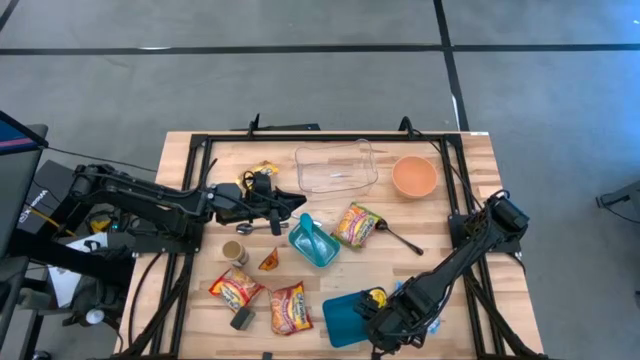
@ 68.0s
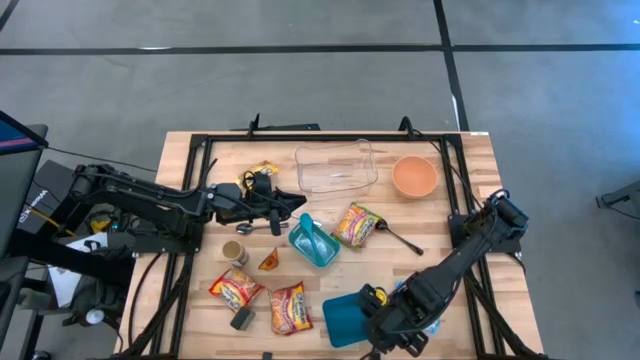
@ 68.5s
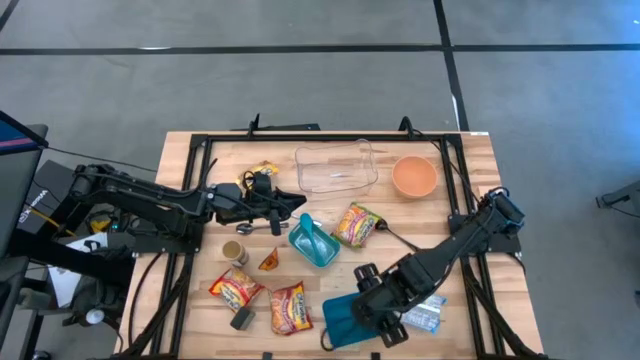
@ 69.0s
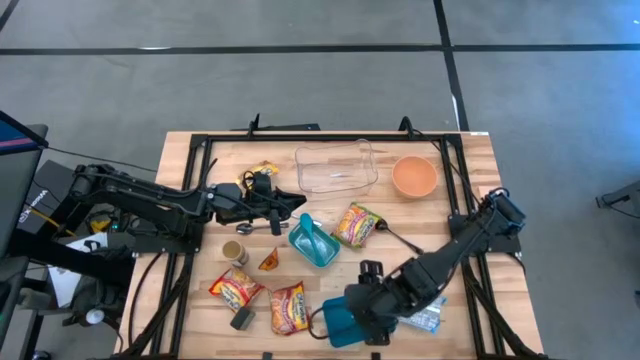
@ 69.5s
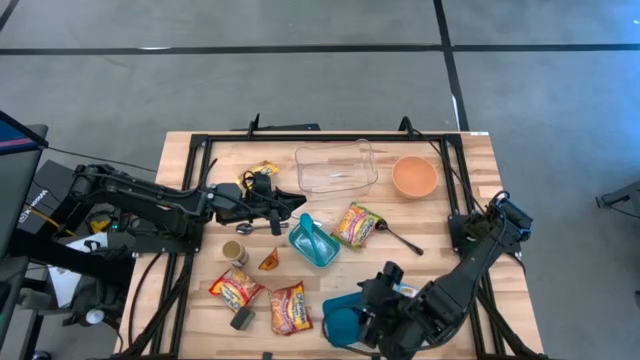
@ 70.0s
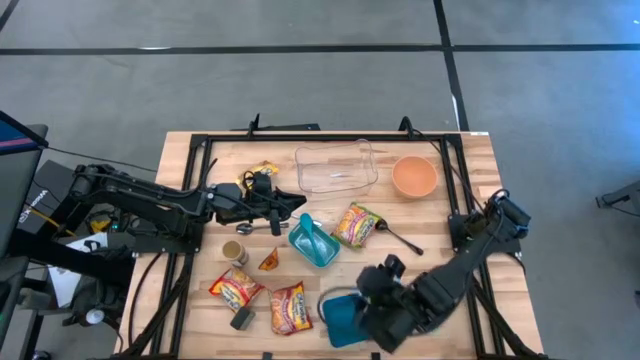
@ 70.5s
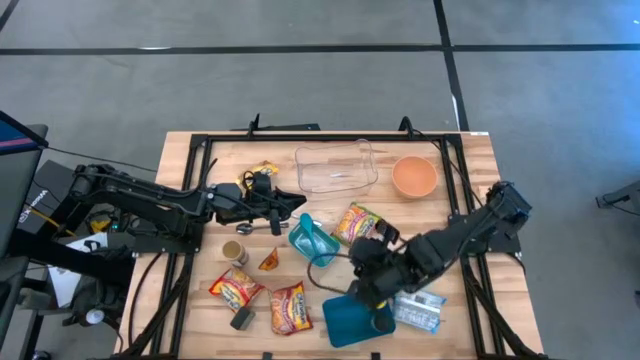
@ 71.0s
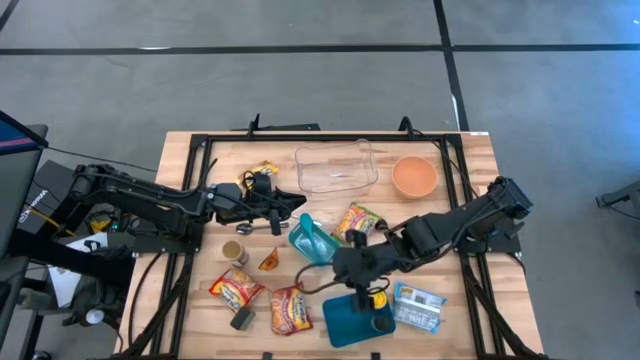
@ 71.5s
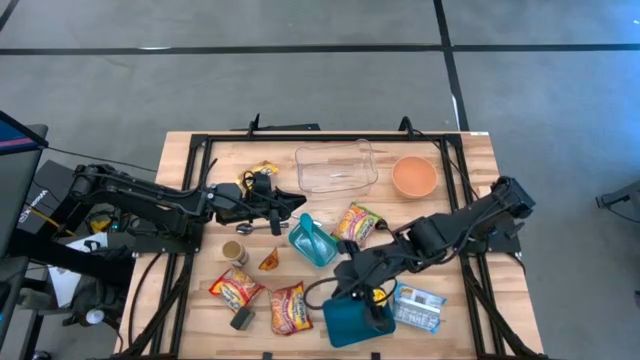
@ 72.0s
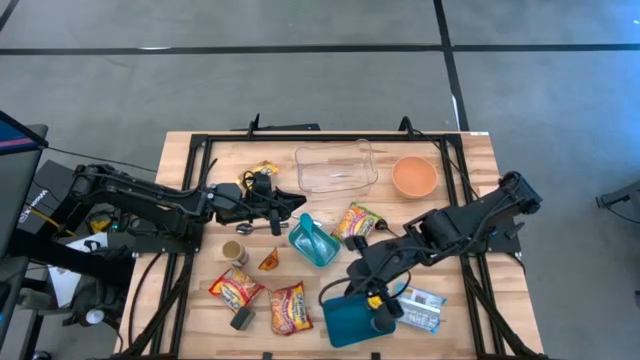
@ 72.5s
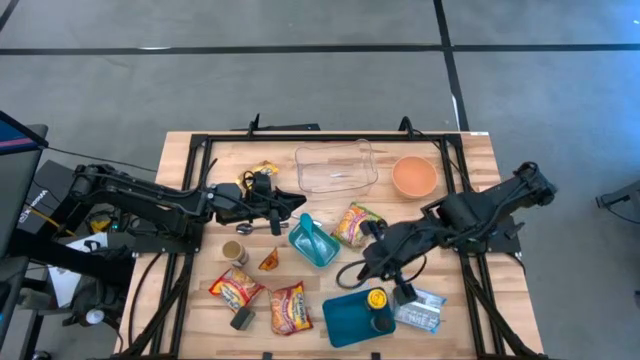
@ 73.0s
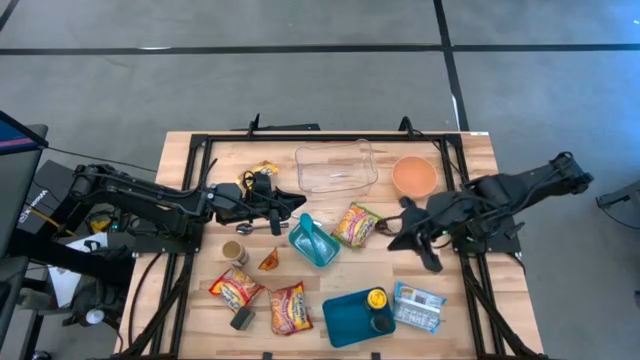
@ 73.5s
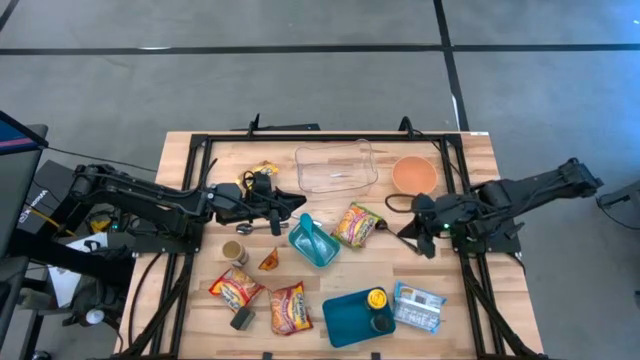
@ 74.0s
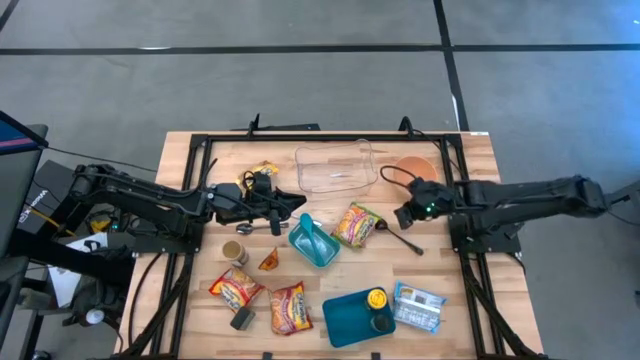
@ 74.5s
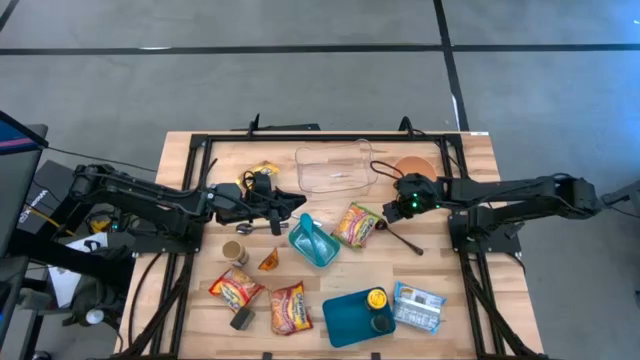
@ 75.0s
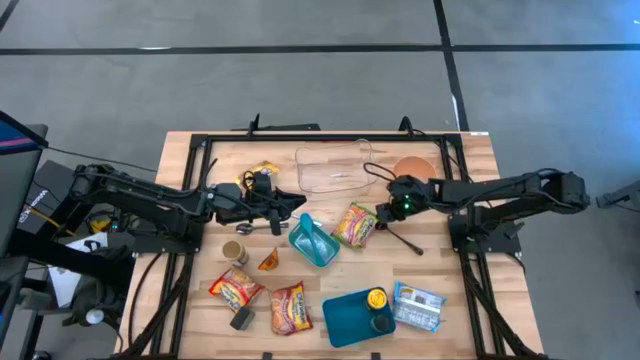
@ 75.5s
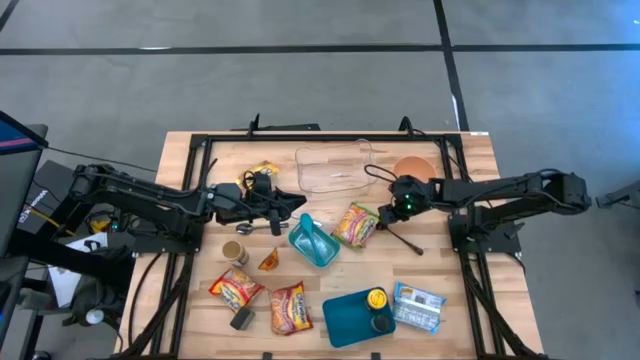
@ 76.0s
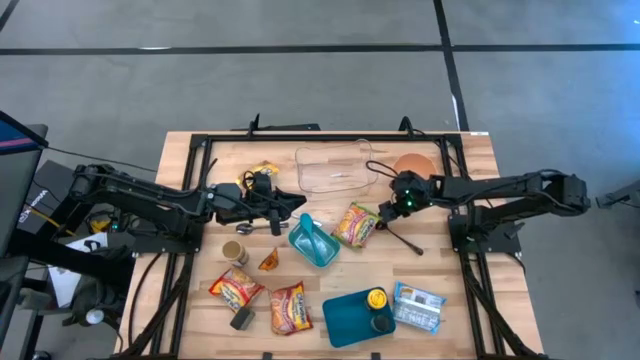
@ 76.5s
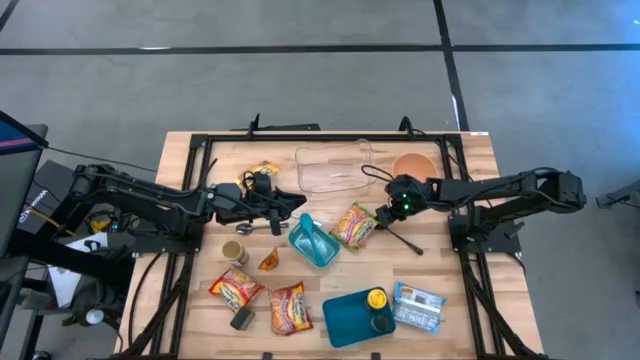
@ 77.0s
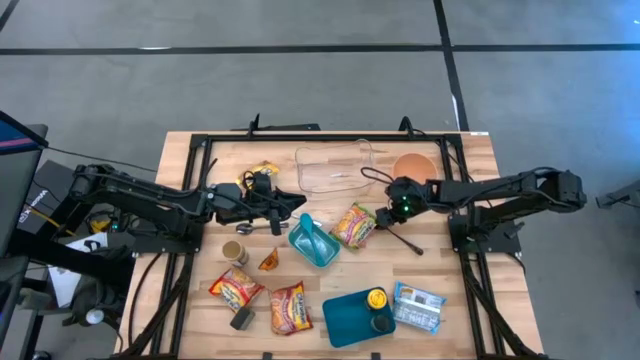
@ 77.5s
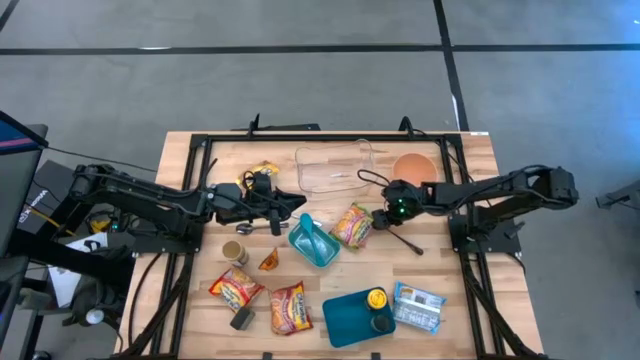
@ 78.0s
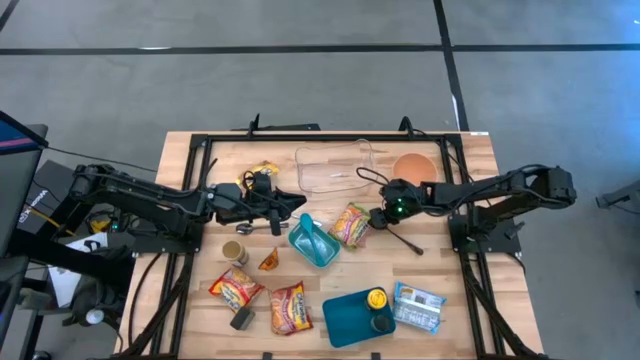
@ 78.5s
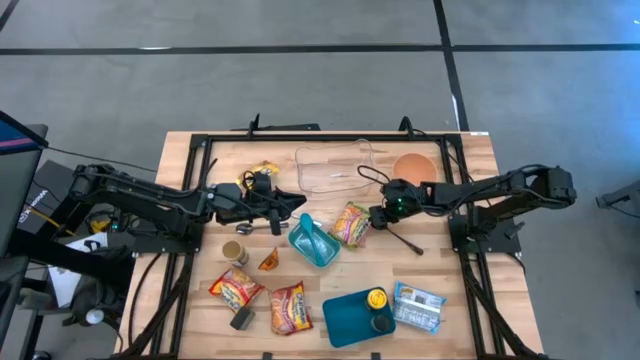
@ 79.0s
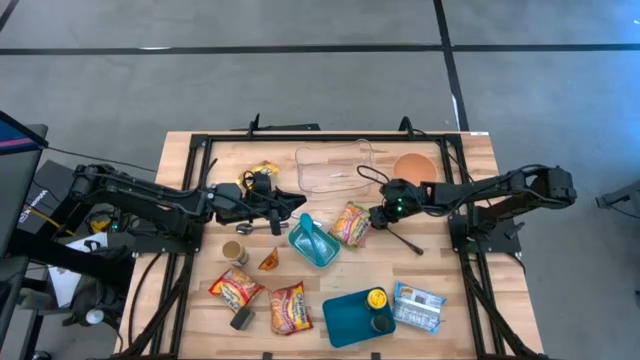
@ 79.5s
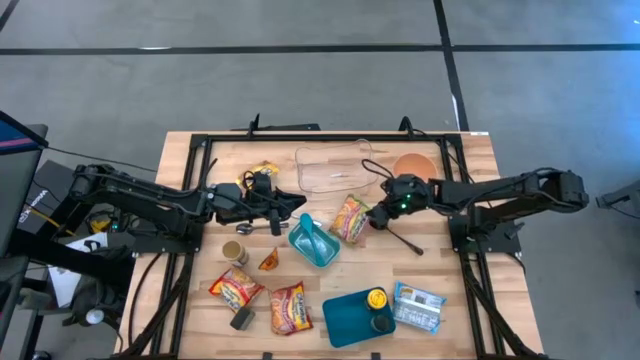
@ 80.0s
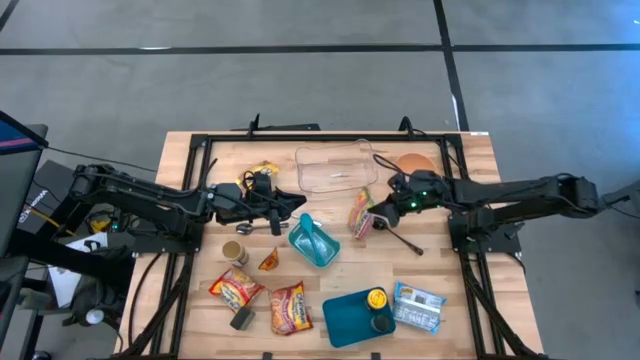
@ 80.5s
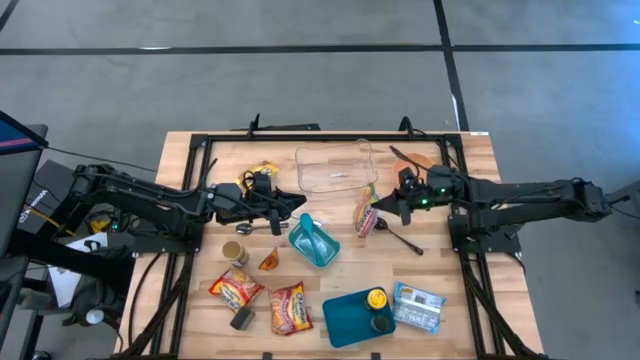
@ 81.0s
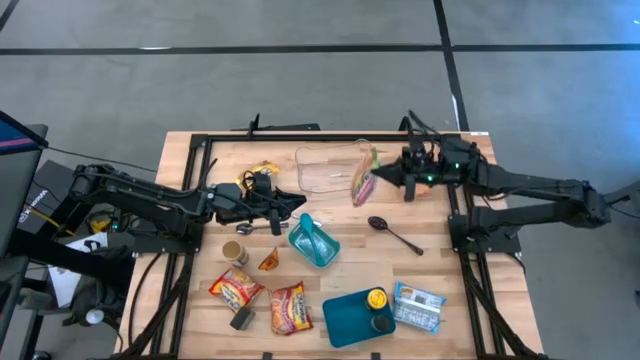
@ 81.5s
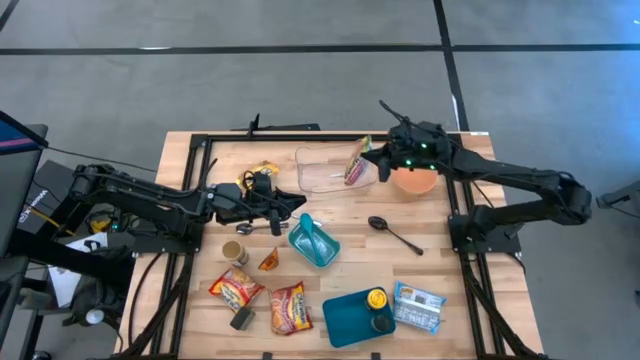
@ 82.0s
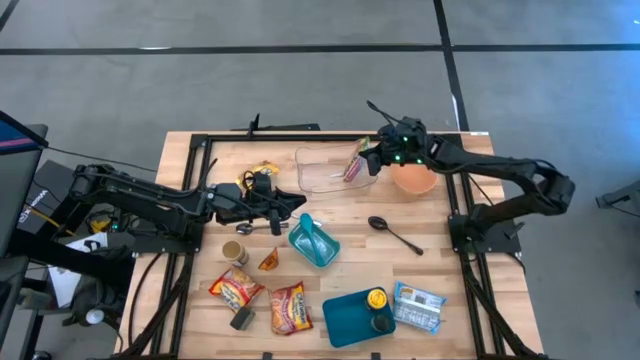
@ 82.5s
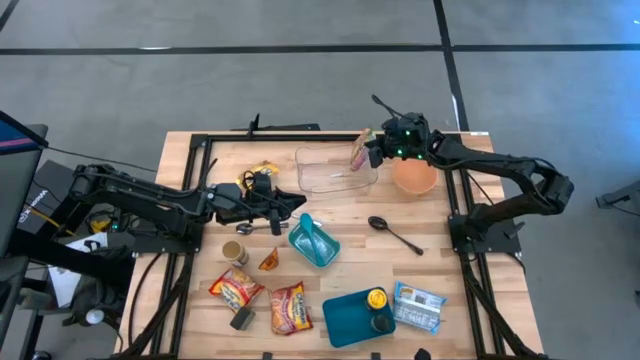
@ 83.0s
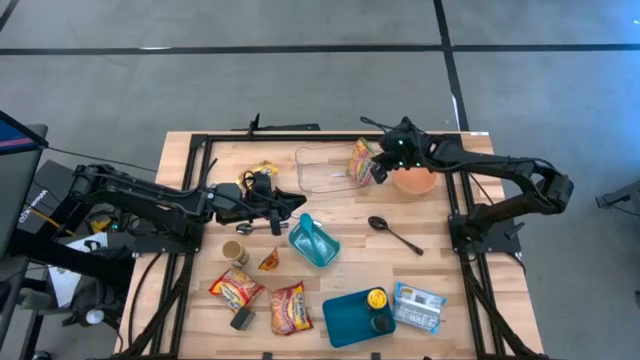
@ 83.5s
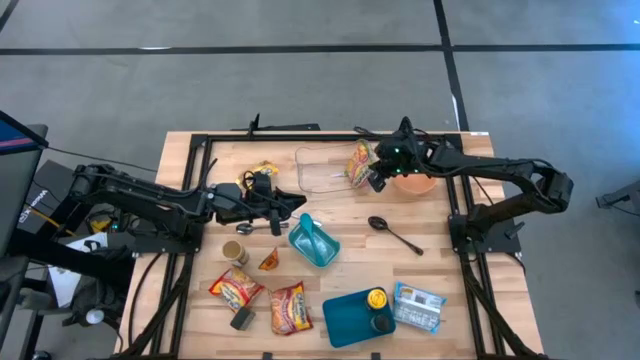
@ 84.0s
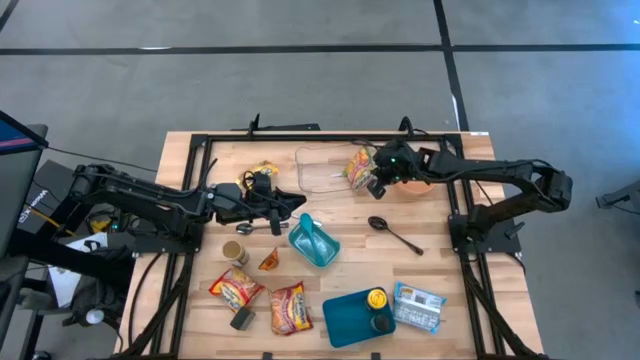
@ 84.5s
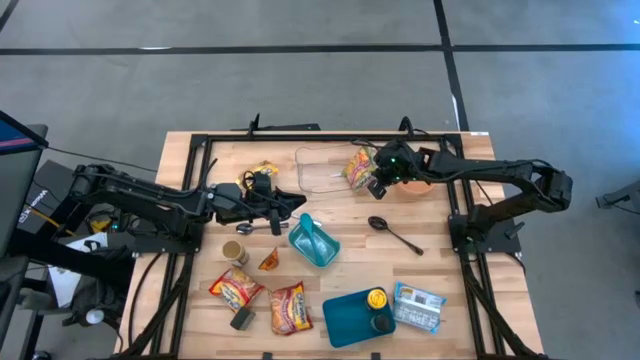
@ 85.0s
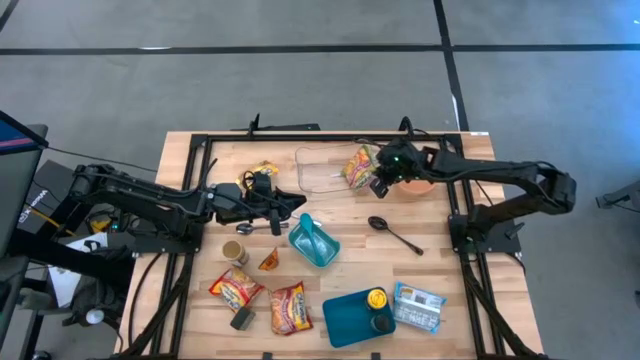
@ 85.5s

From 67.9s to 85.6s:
Task: Pick & Place Food Item
Put the green noodle pack into the transparent bin

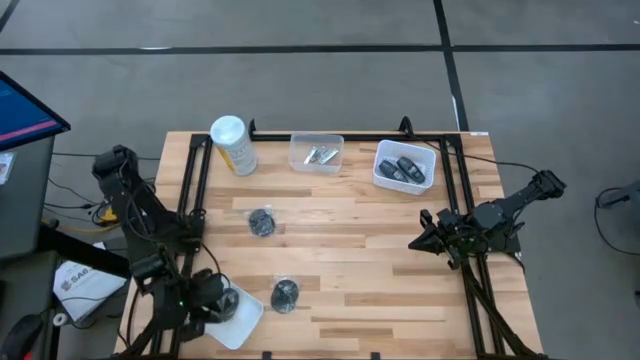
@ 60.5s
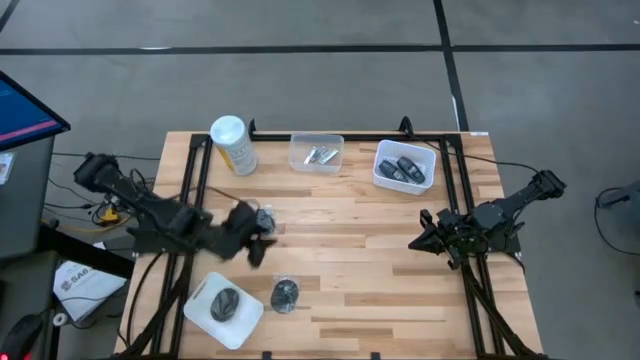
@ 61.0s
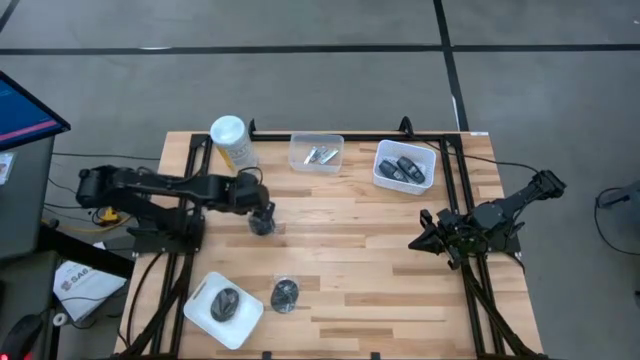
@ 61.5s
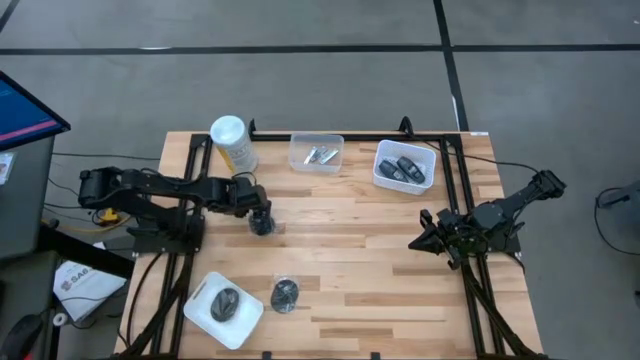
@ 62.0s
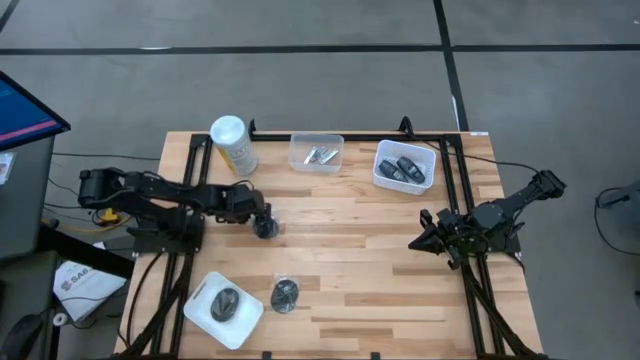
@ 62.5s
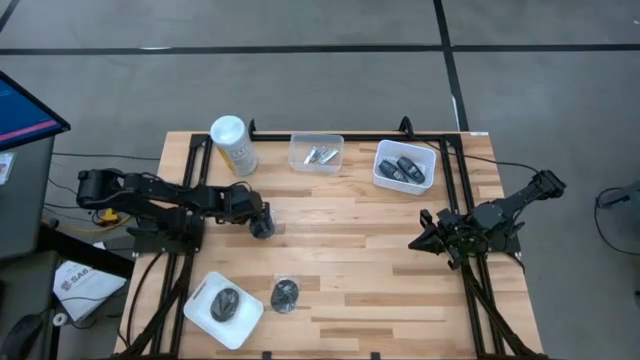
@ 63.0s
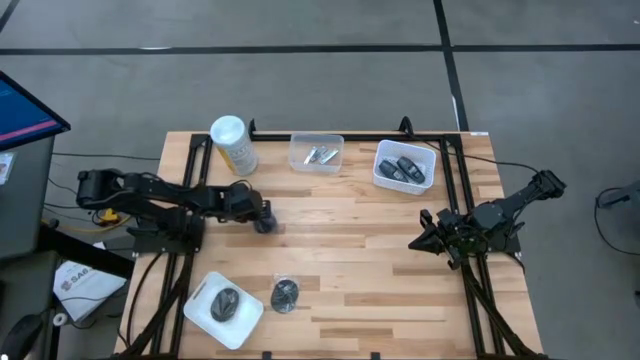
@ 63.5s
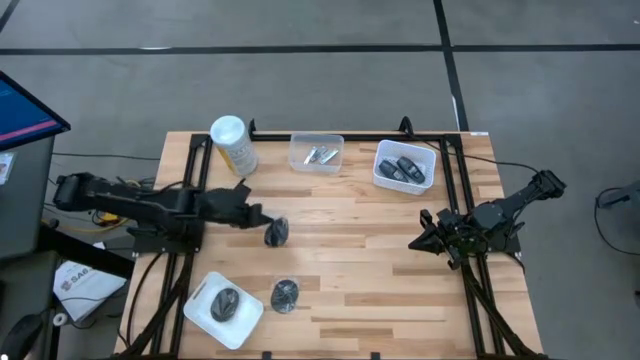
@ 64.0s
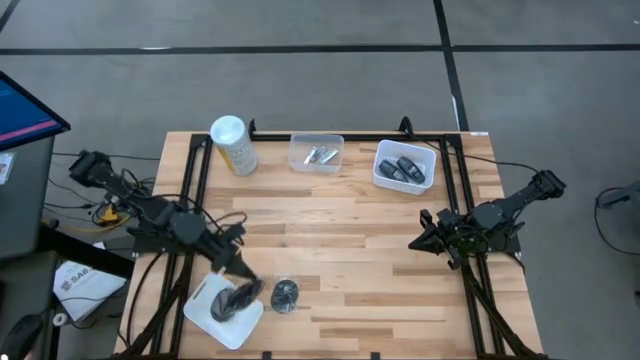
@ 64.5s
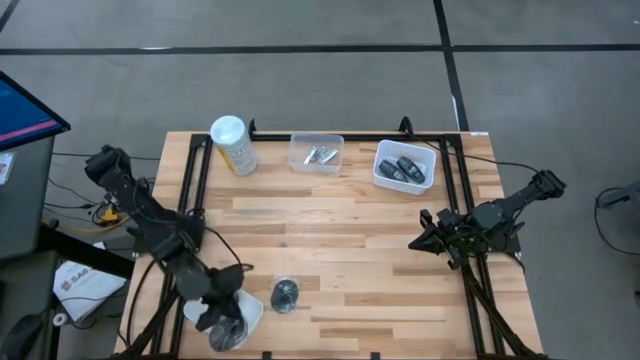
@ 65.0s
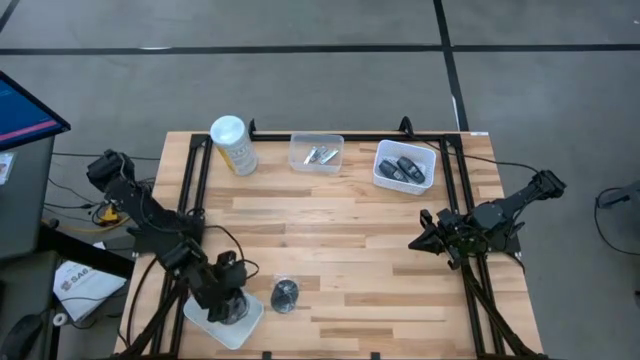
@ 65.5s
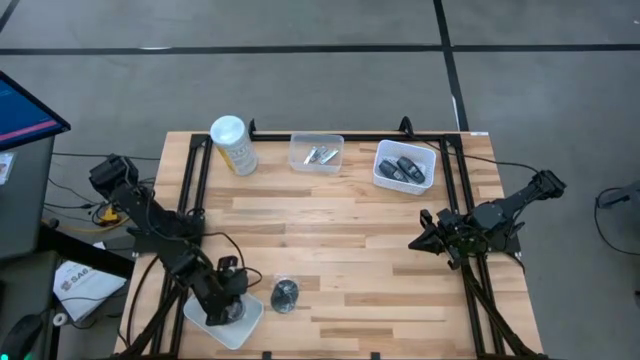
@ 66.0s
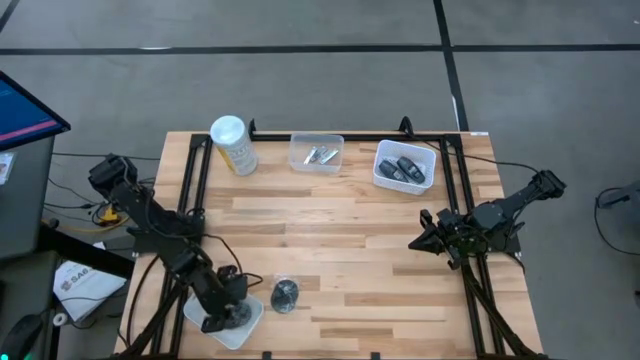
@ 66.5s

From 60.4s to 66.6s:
Task: Pick & Place Travel size toiletries
Put the black hairbrush into the white bin
